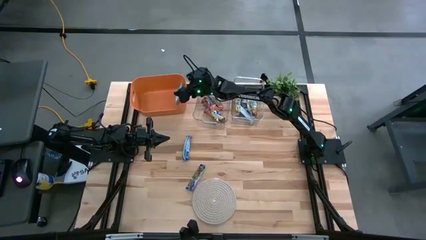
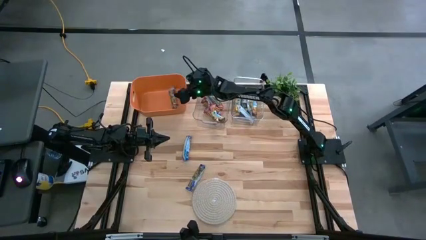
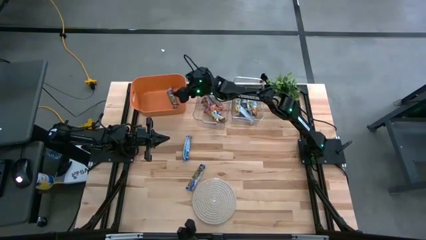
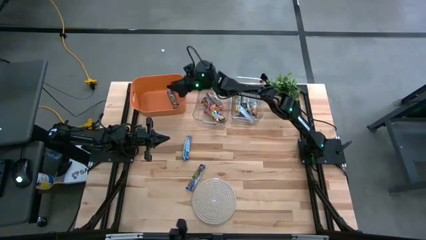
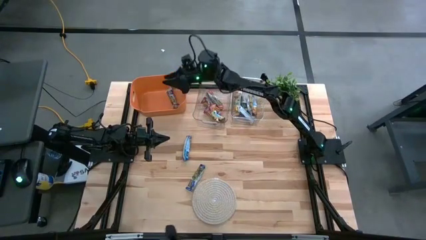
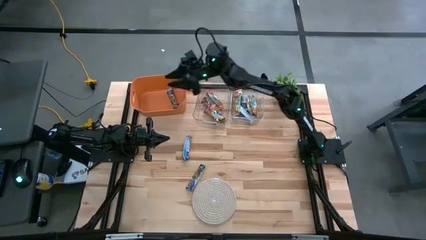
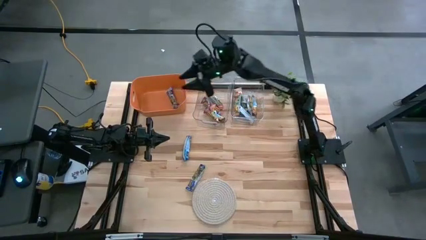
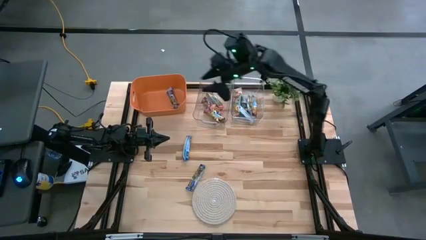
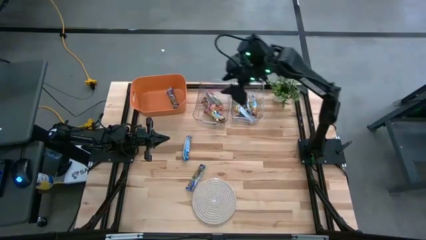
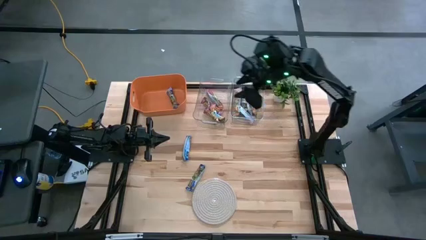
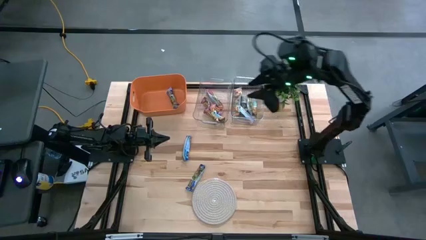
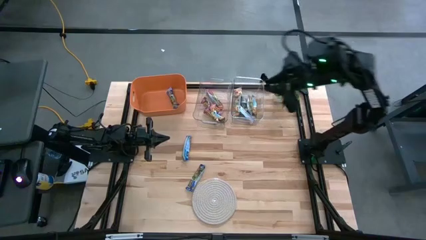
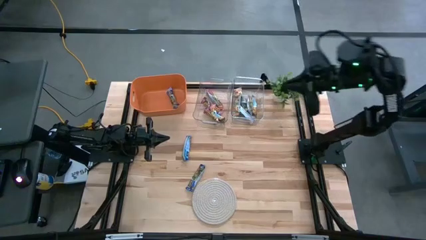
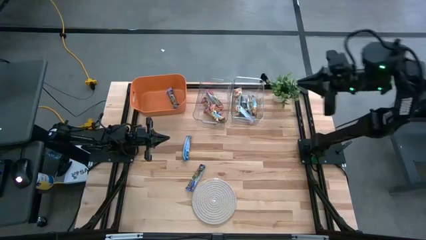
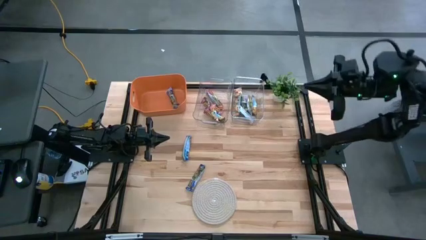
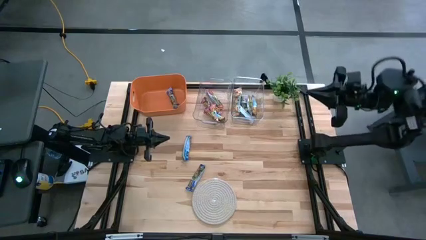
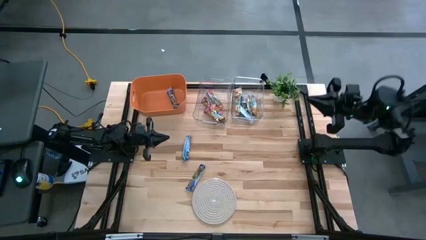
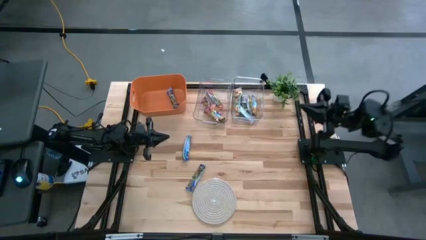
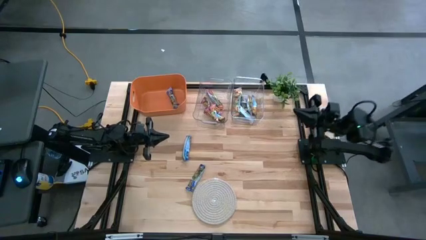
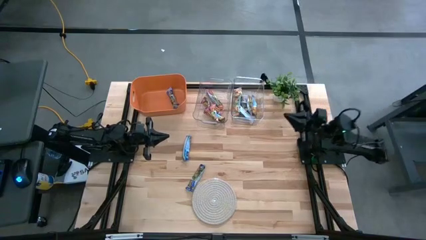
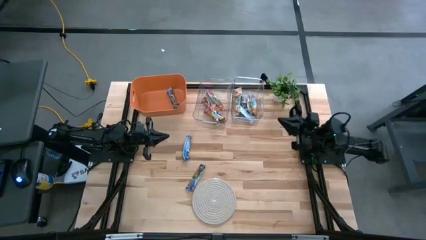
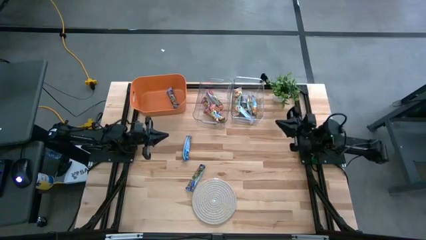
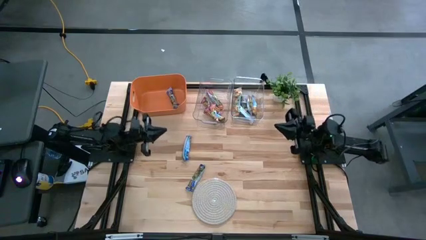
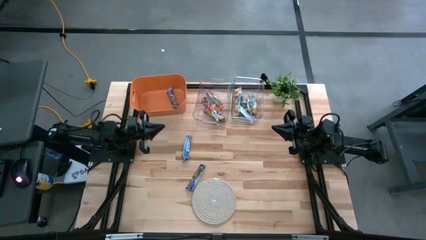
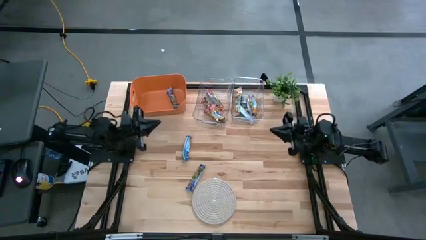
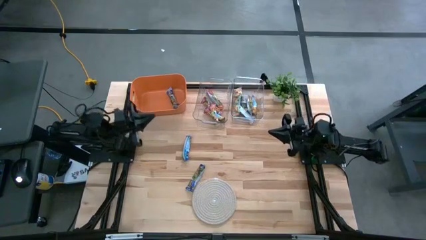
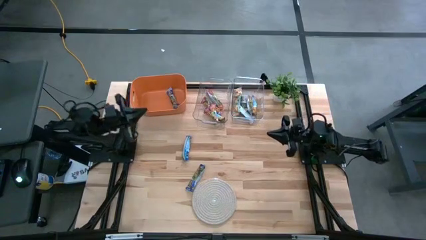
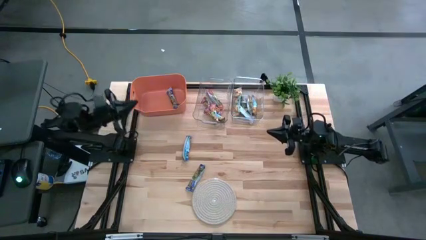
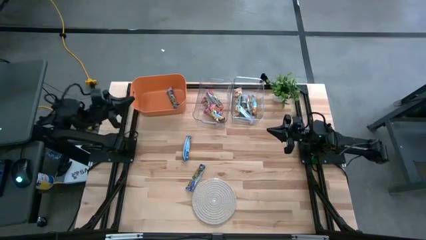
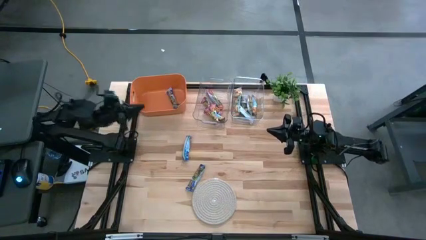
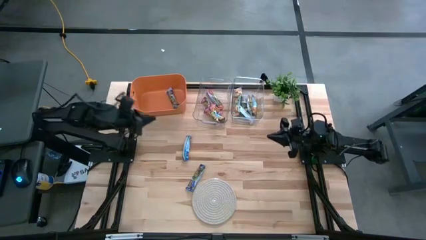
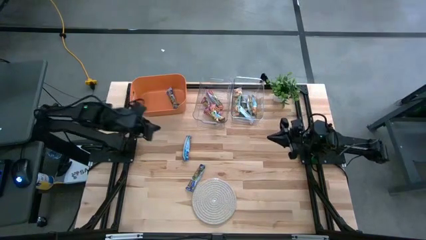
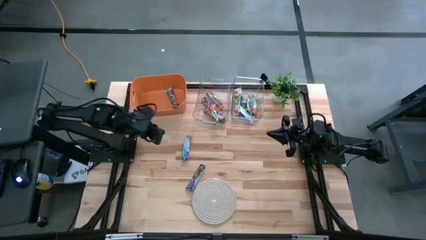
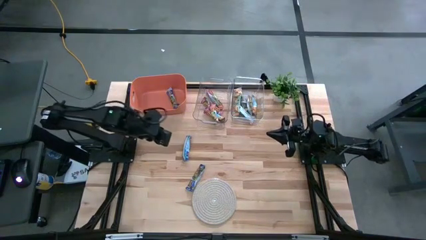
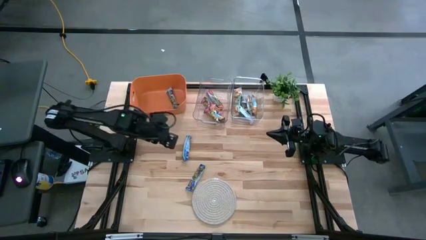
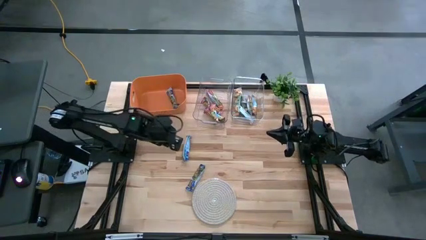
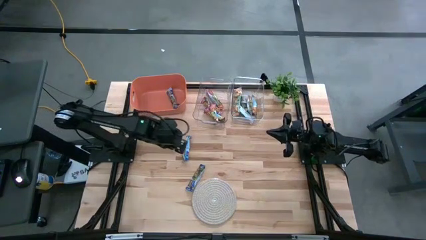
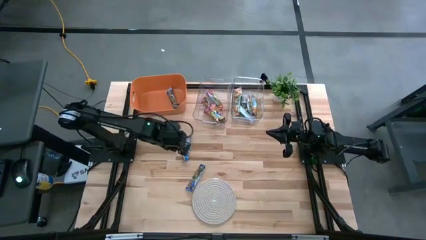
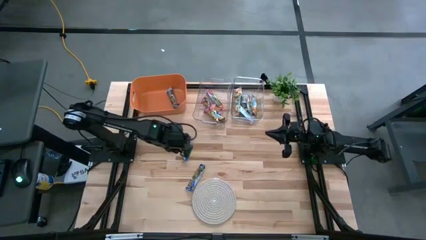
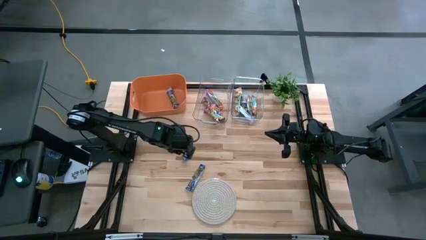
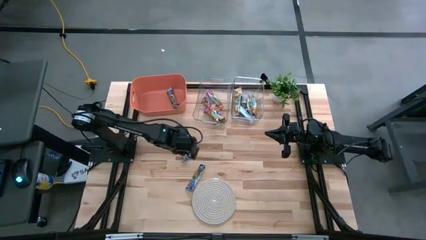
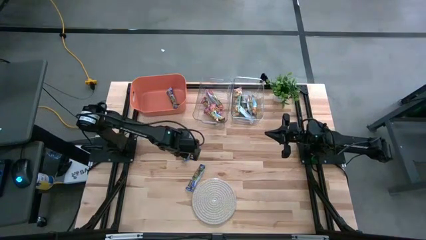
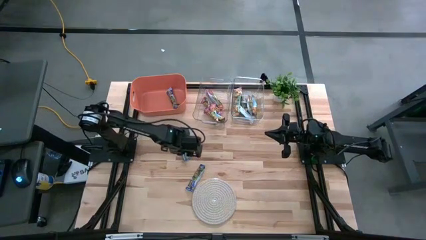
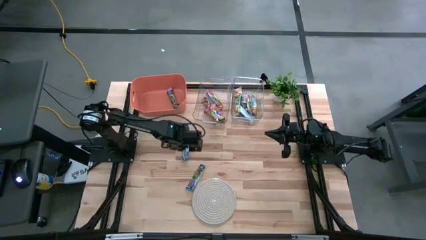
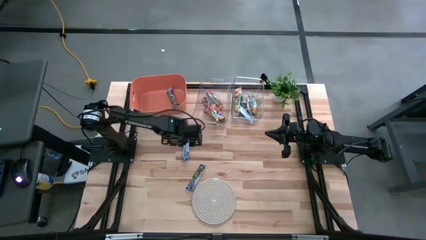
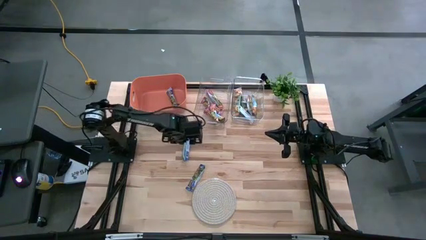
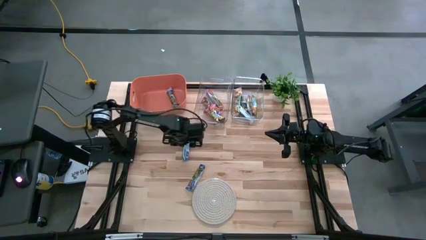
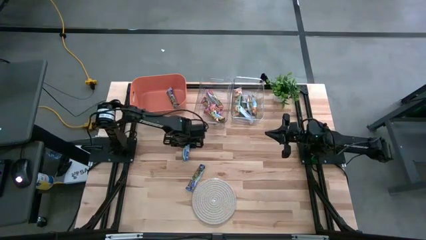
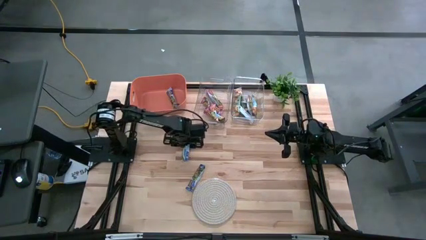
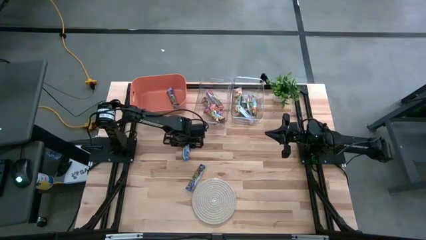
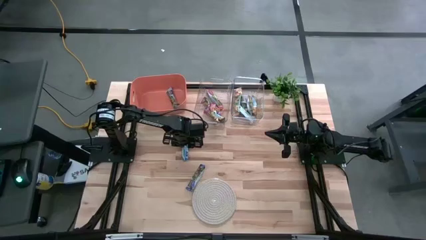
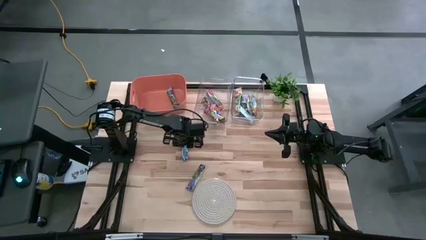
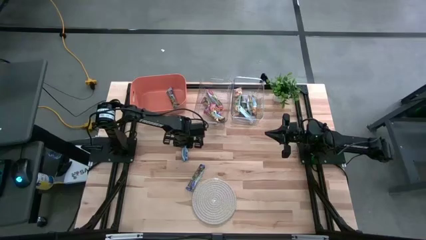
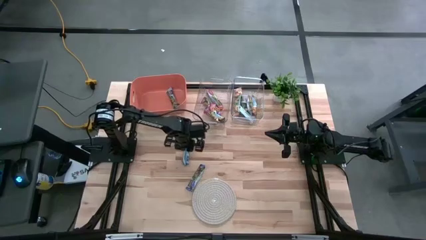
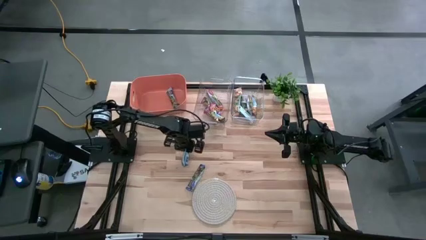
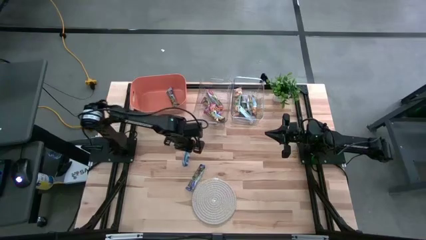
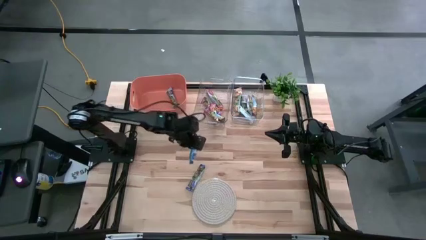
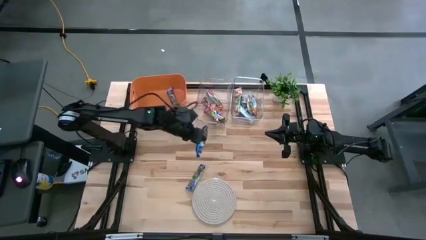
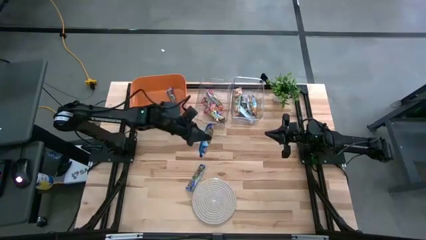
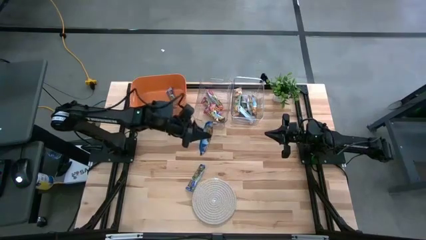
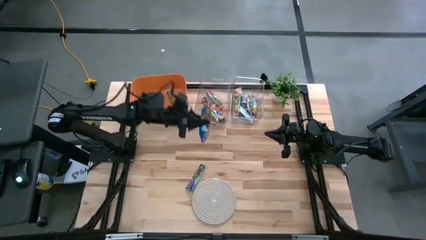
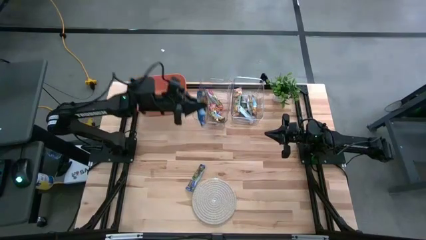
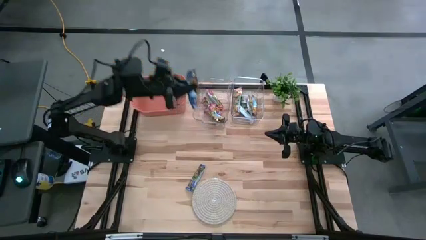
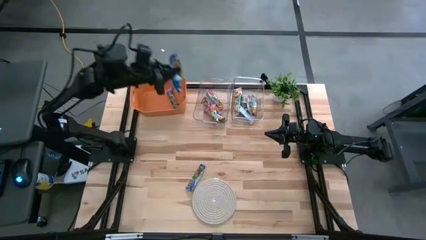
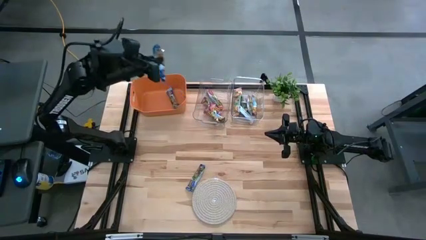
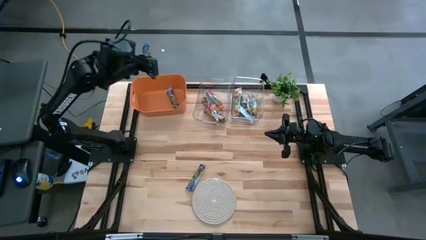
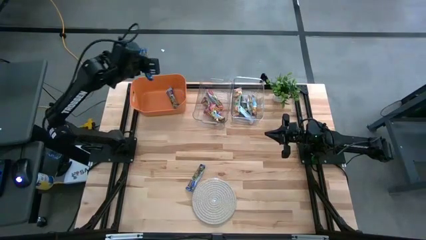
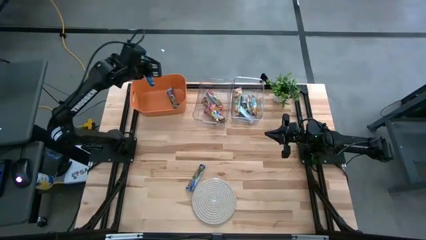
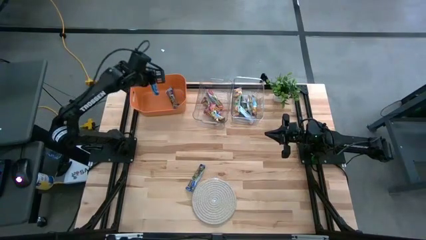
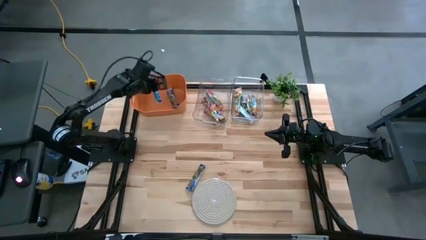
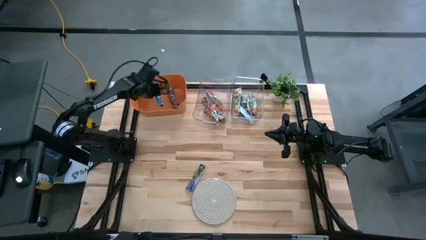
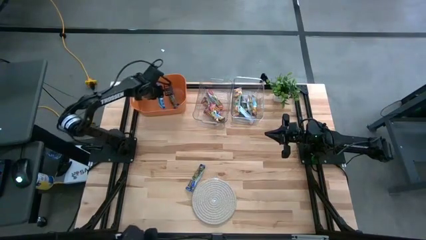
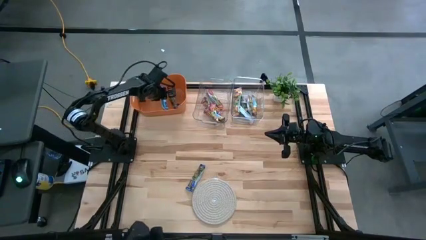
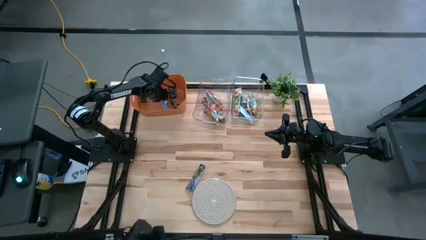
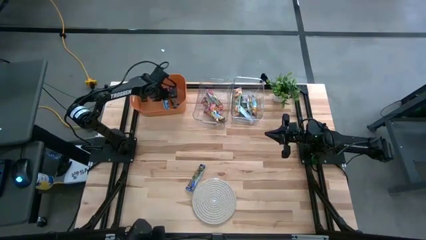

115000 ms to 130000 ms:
Task: Pick and place Granola Bars by type
Put the blue granola bar into the orange bin
